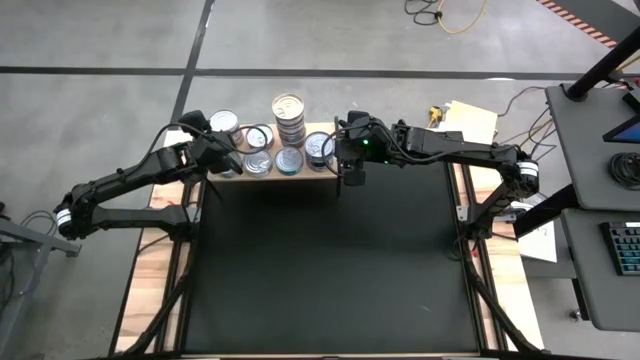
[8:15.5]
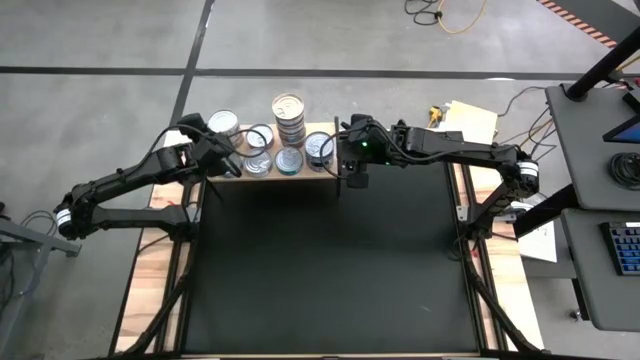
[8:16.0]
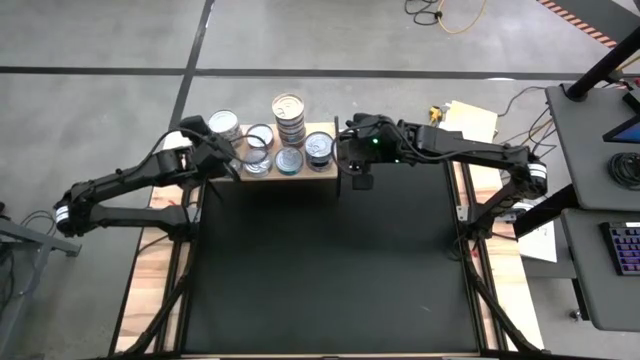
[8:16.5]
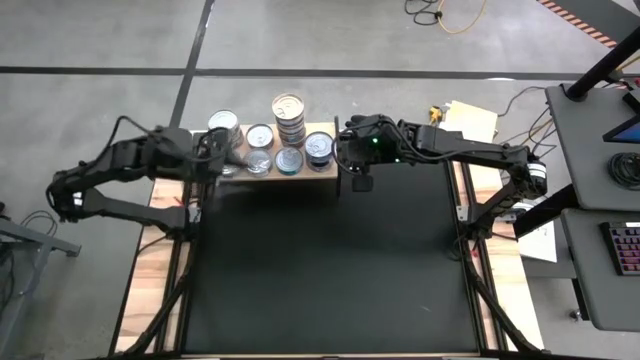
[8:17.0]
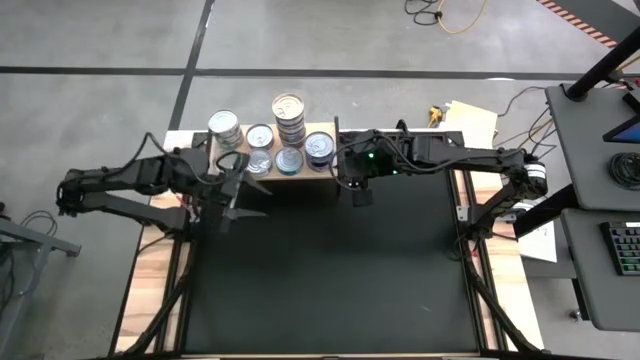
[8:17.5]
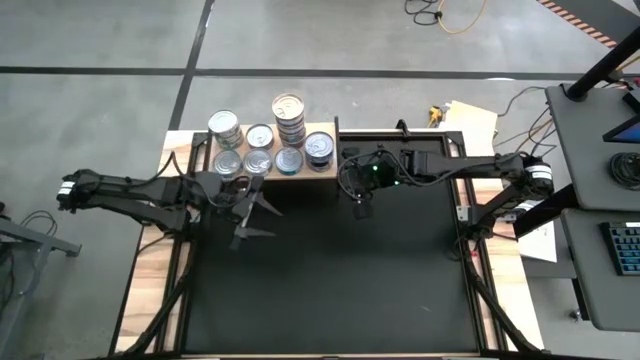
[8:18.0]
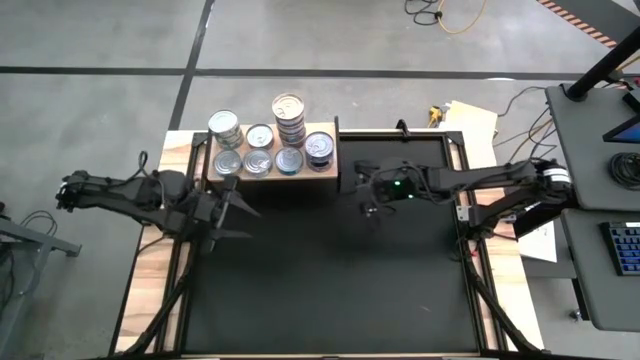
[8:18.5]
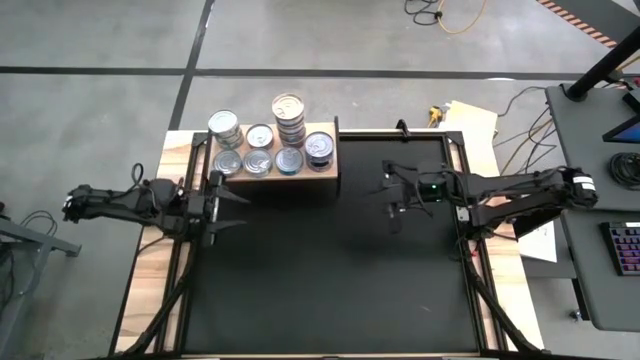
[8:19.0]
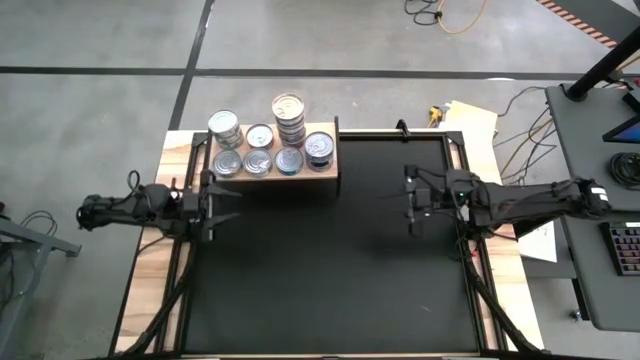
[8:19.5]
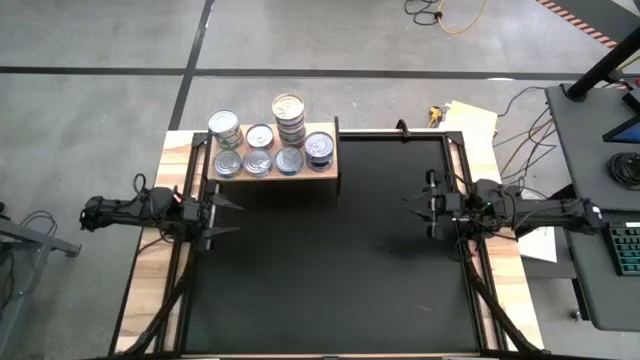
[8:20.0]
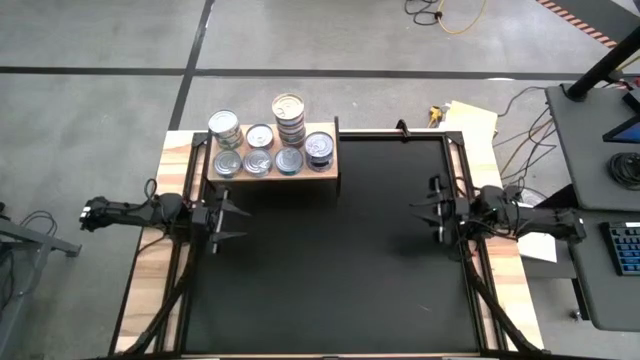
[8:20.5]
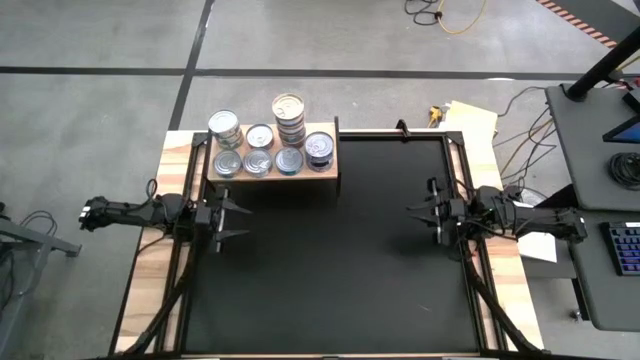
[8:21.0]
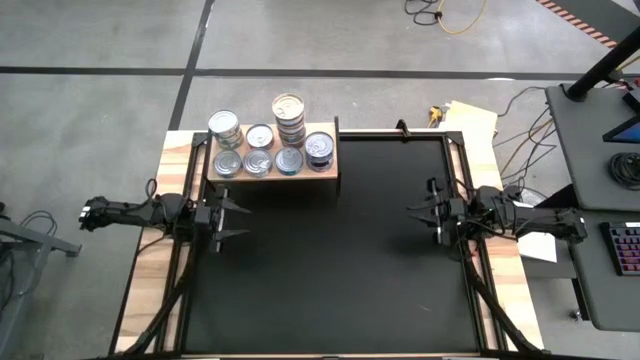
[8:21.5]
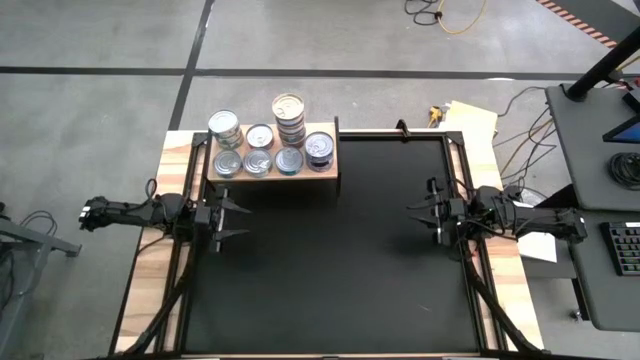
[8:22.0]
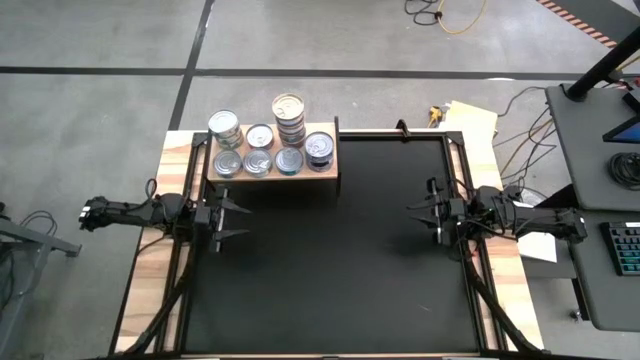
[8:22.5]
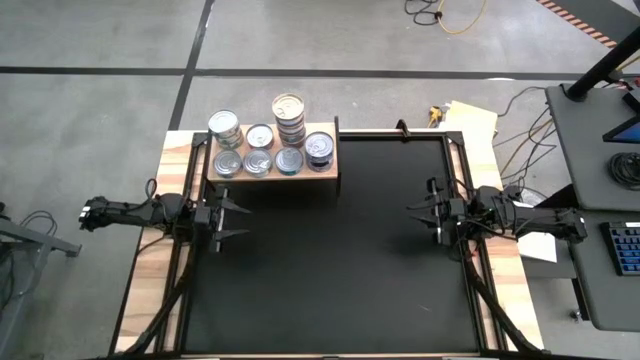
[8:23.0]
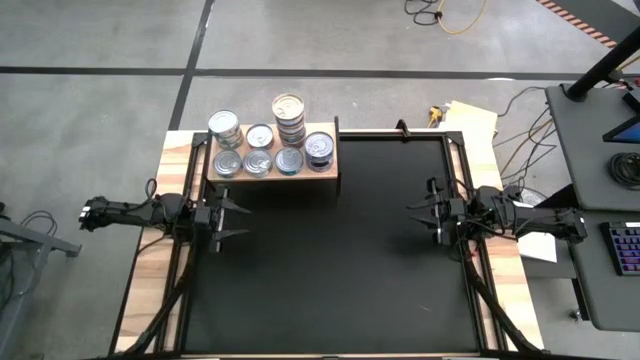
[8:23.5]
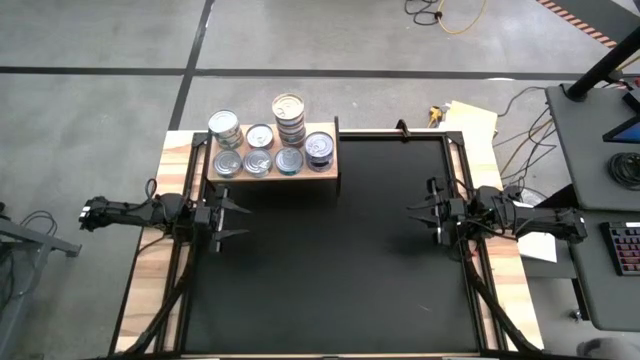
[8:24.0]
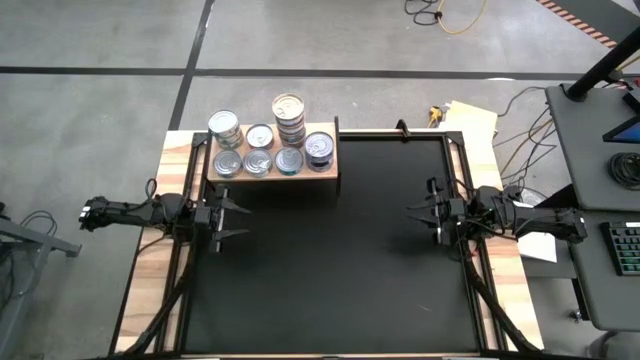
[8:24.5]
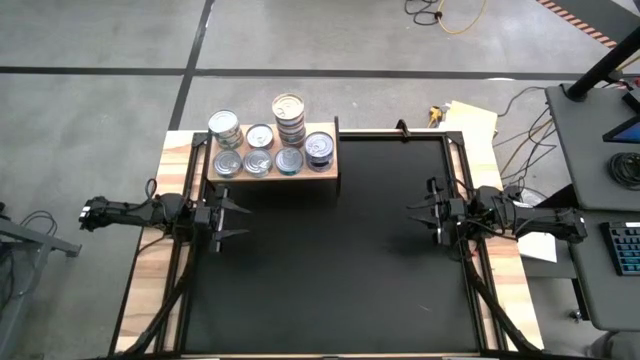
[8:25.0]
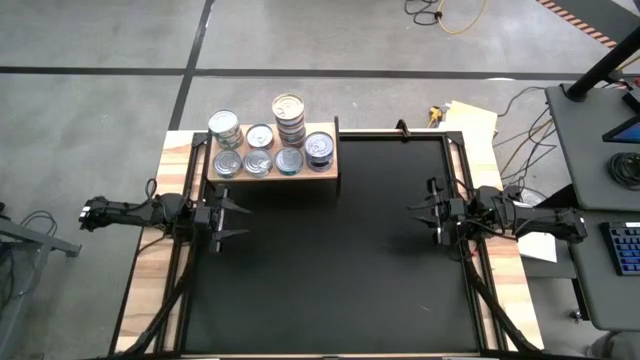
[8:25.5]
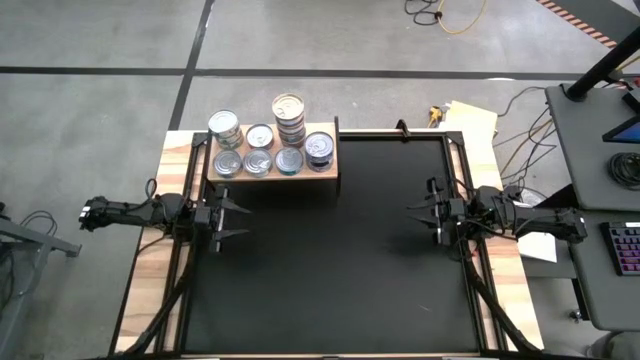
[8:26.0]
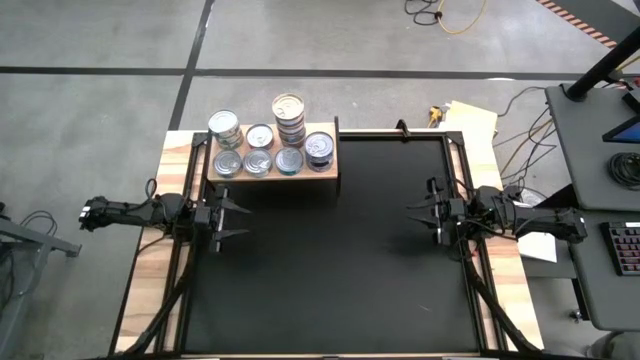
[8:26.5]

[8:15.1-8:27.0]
Task: Stack canned seafood by type on shelf
Return to Home Position

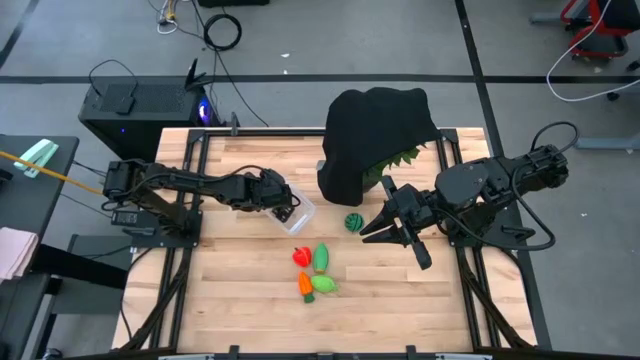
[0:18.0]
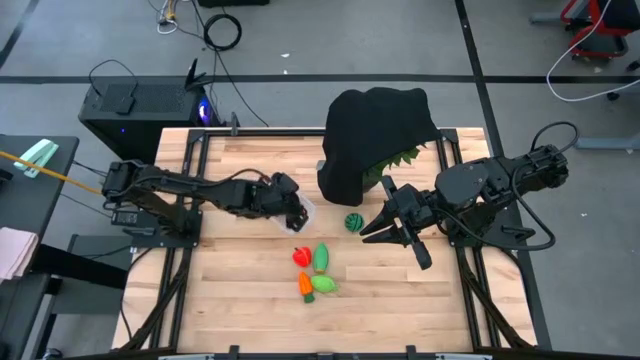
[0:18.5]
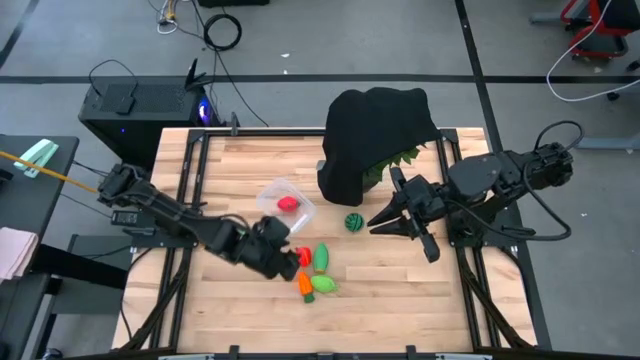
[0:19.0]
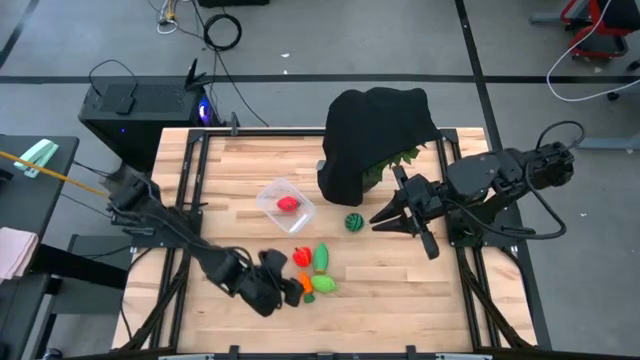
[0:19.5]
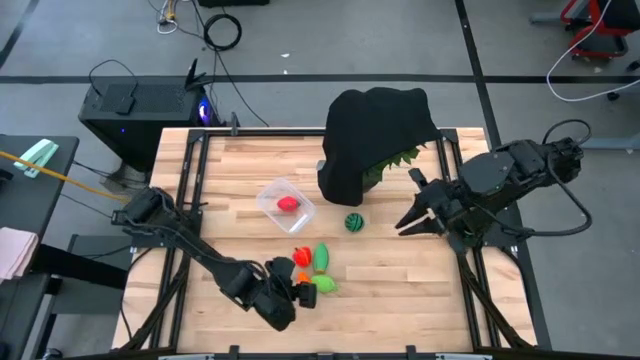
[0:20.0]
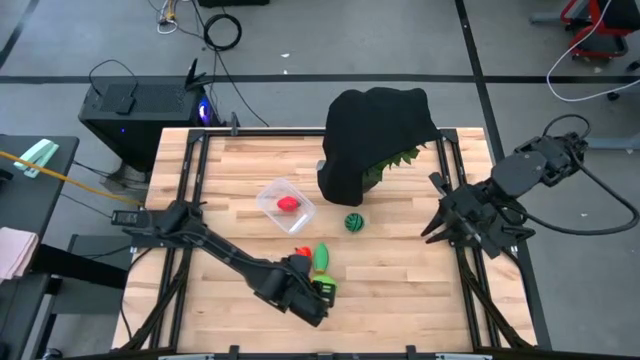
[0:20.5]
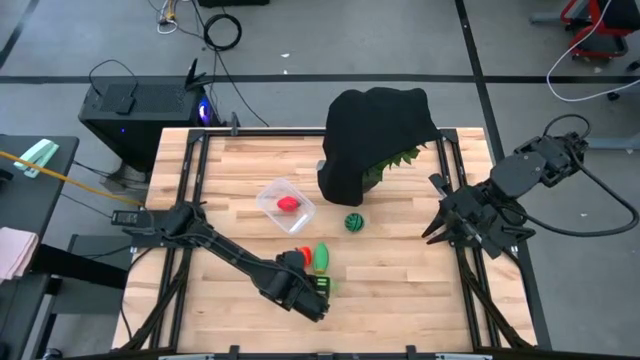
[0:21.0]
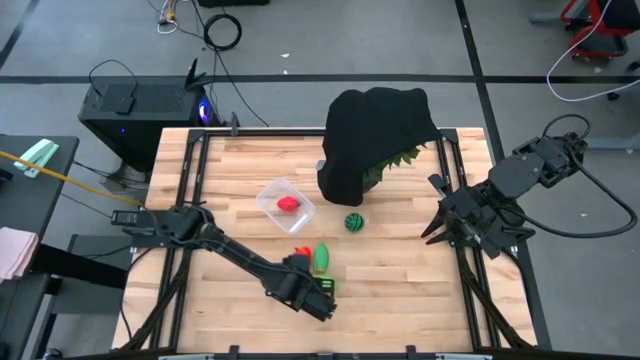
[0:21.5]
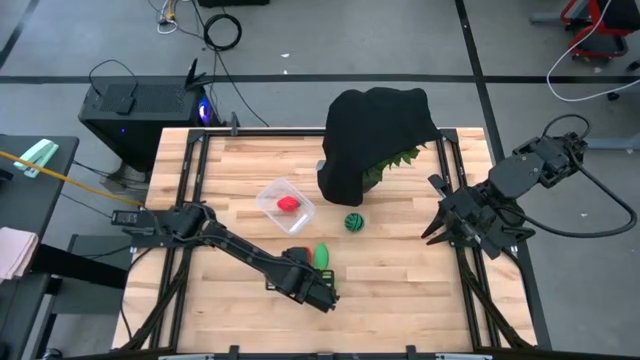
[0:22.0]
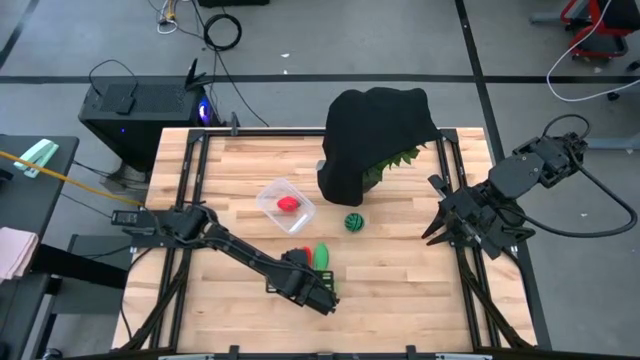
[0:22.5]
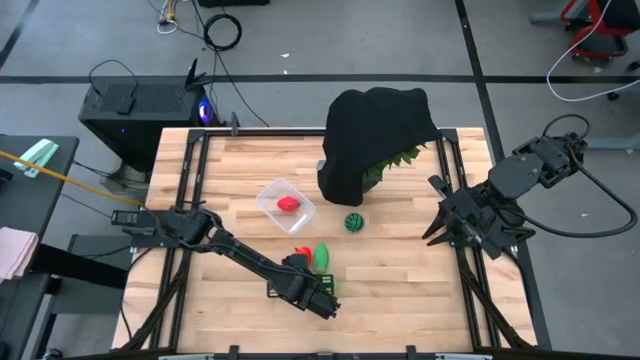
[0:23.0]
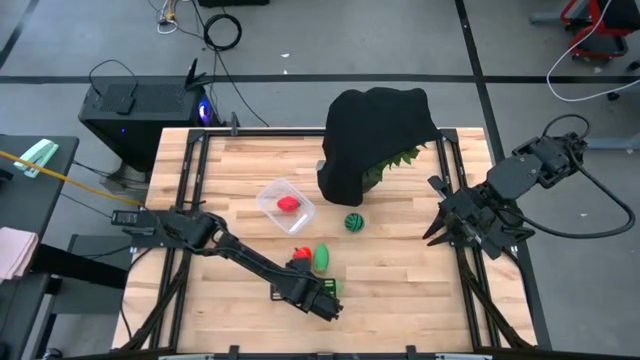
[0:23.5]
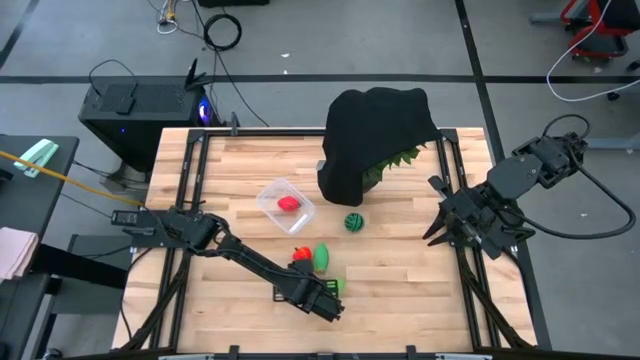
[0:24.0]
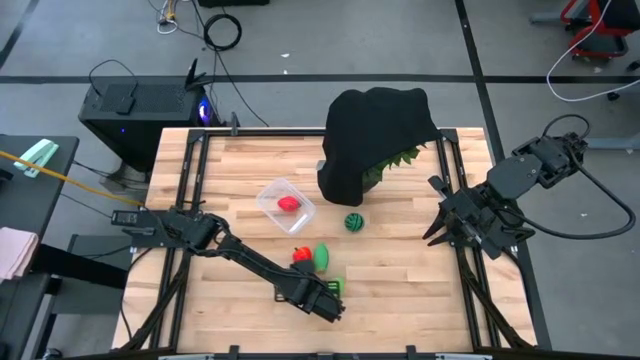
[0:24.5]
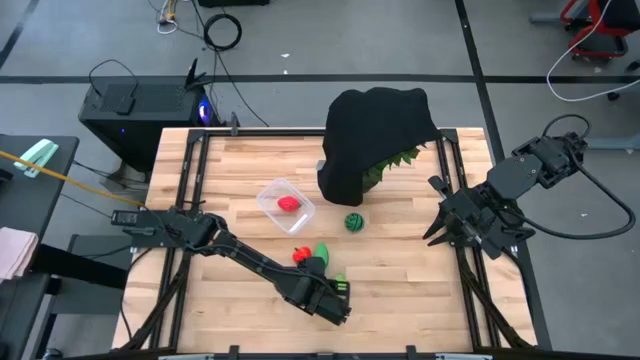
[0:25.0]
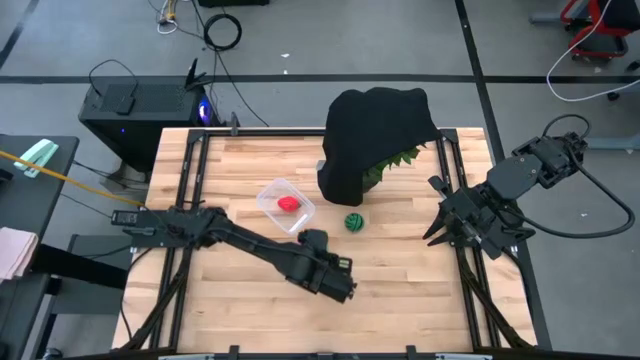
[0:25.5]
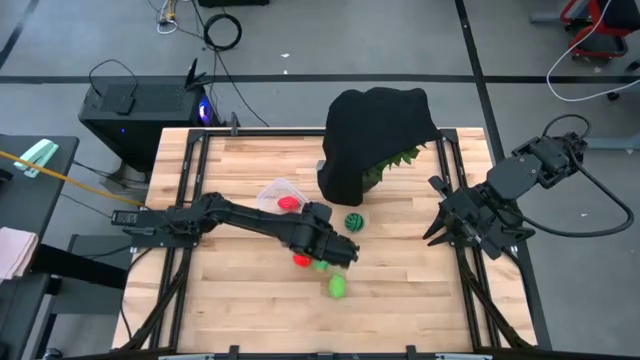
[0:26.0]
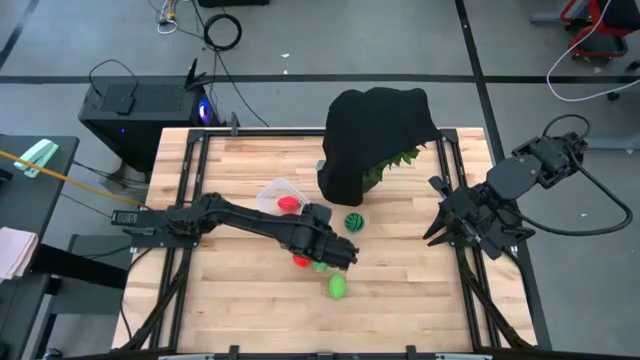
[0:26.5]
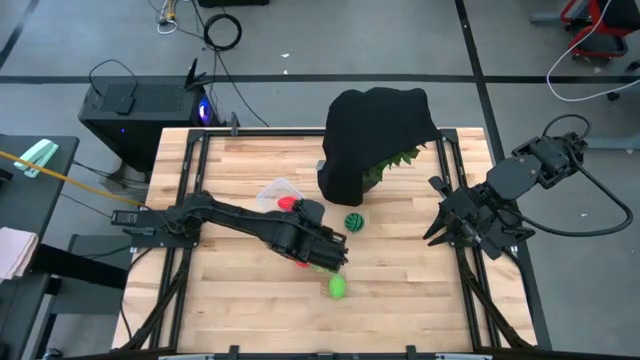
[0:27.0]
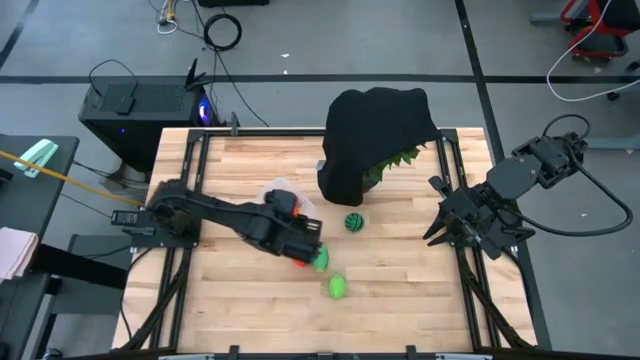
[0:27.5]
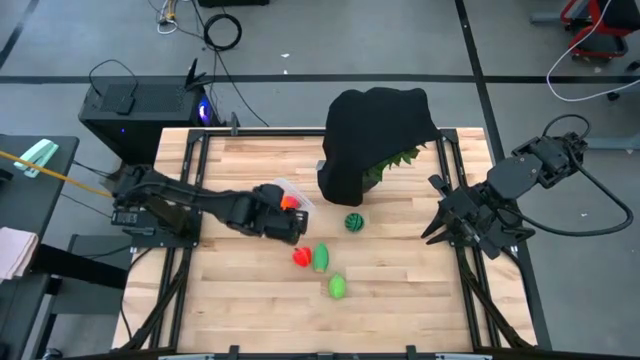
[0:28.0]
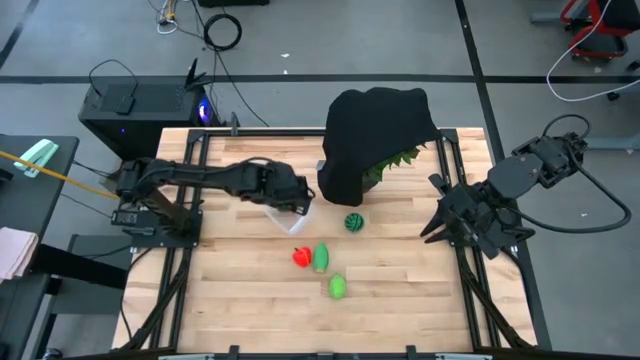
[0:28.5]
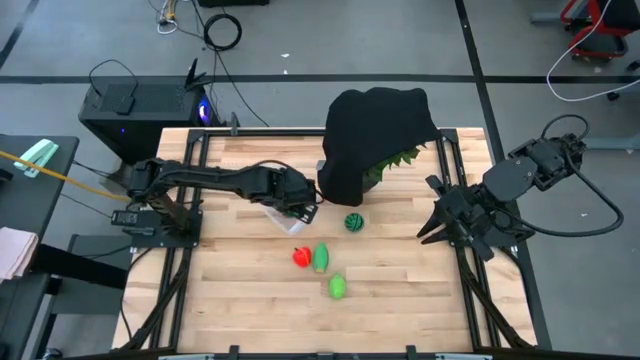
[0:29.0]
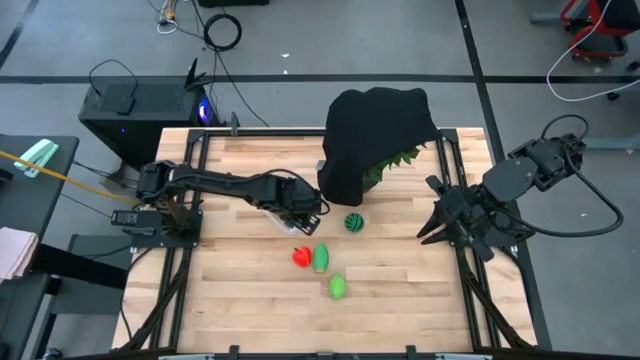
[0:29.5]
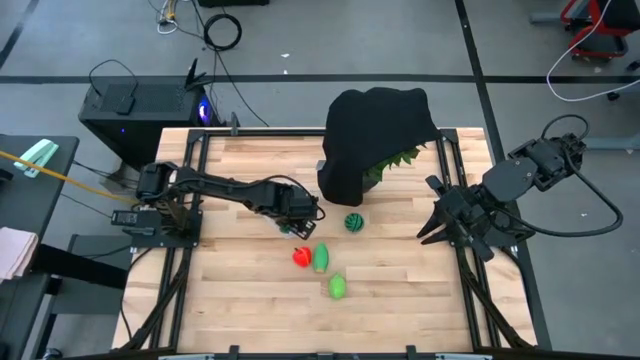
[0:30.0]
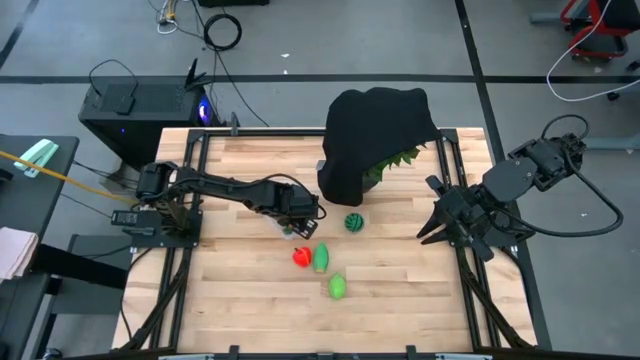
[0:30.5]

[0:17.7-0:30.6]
Task: Pick and placing Produce into tupperware
Put the orange carrot into the transparent bin
